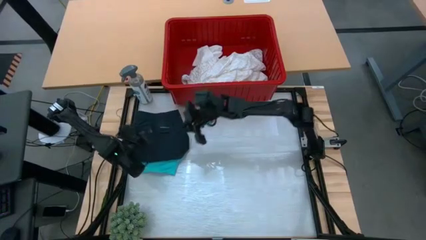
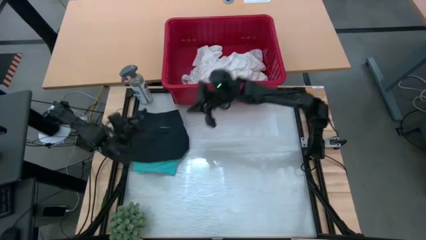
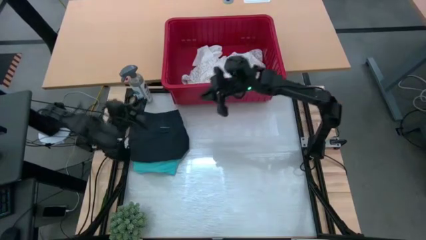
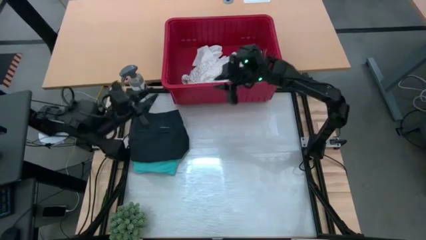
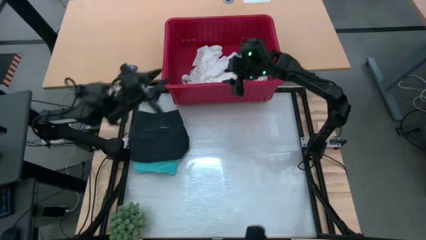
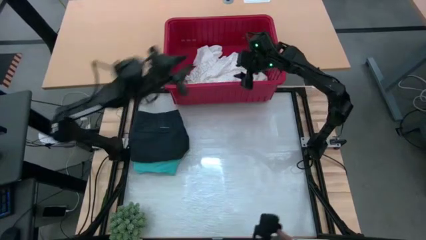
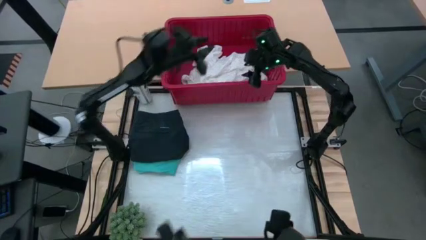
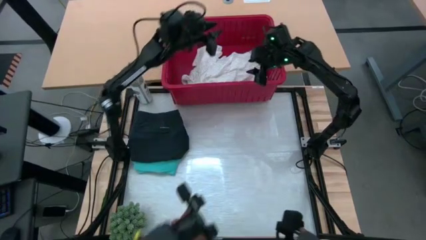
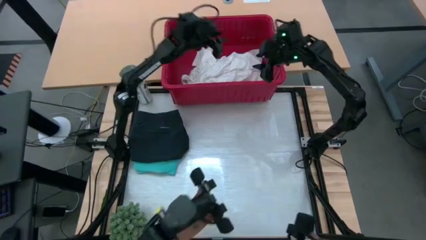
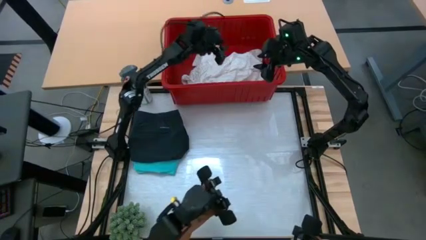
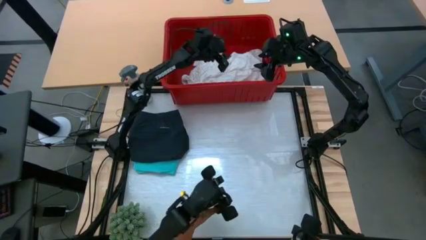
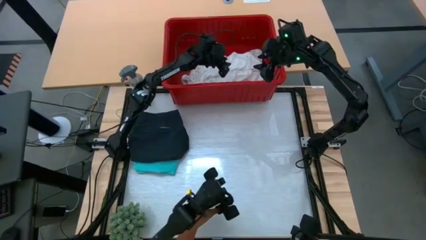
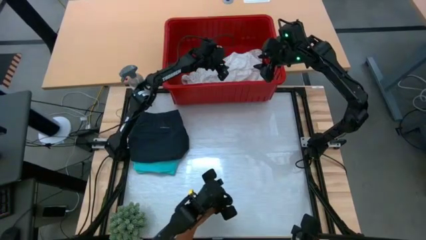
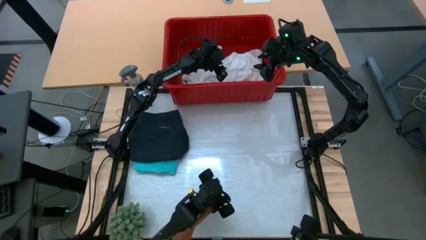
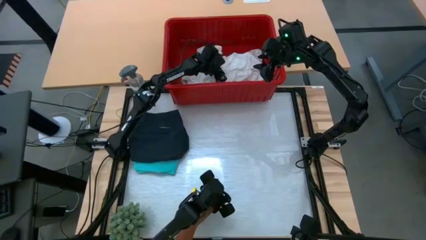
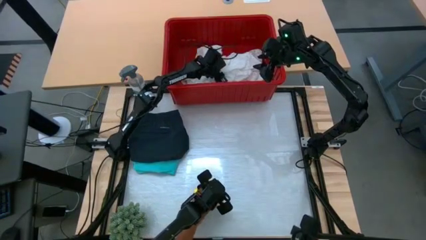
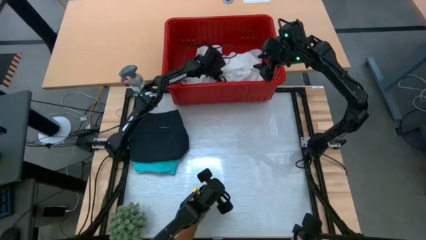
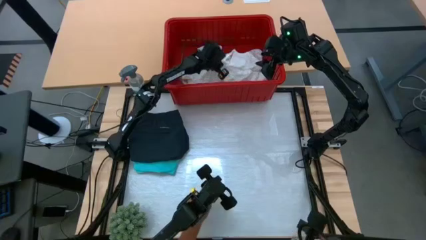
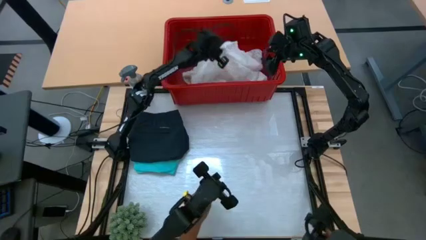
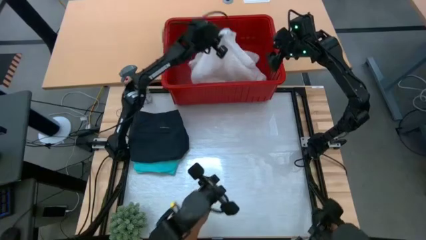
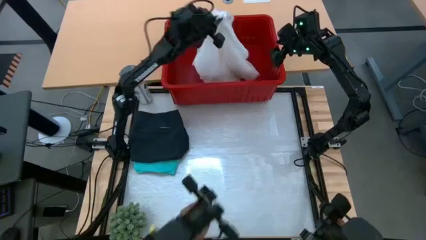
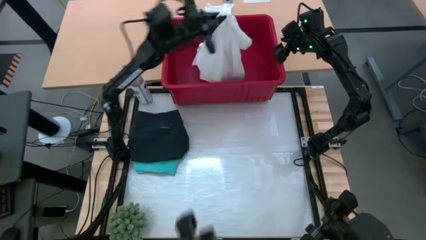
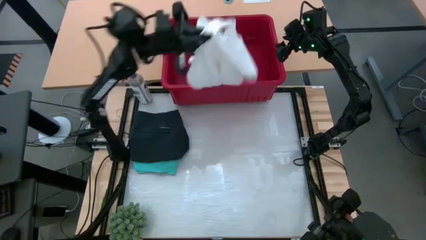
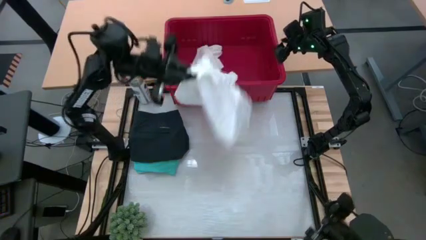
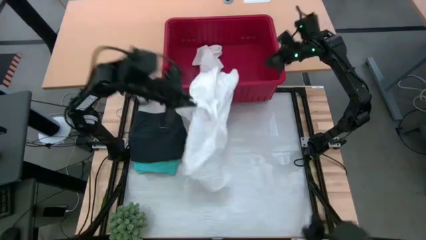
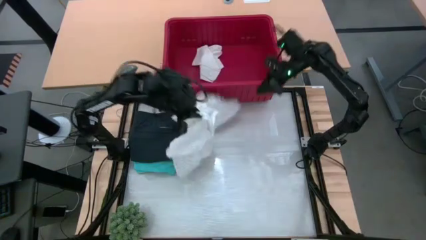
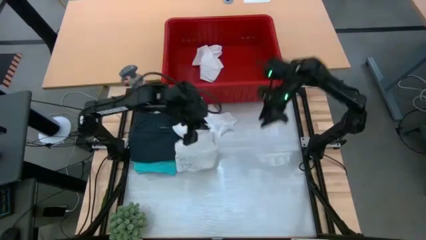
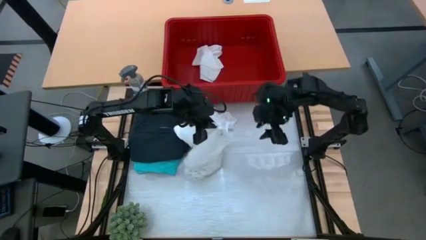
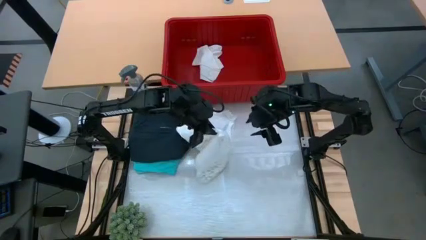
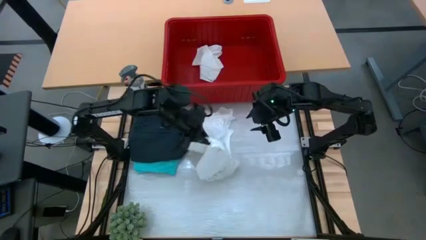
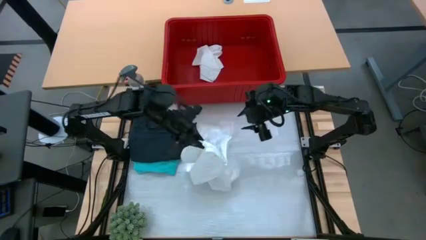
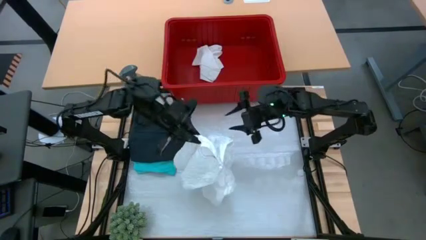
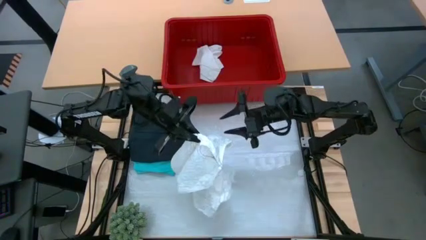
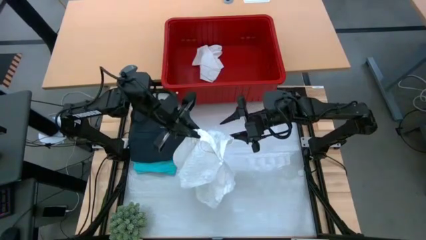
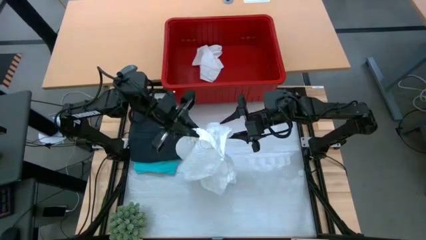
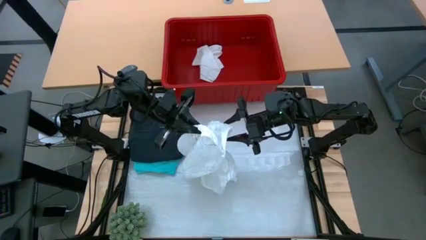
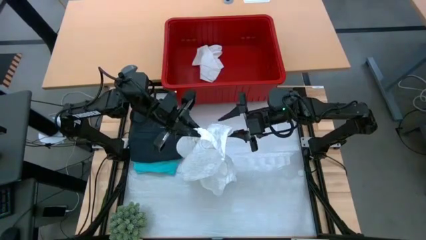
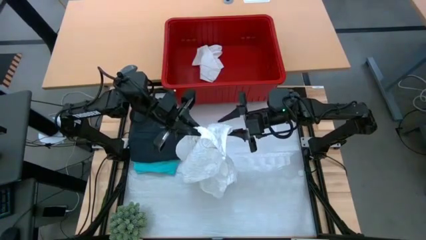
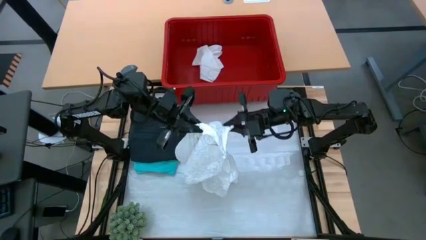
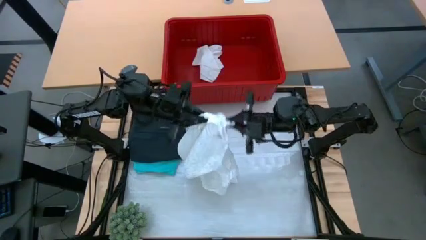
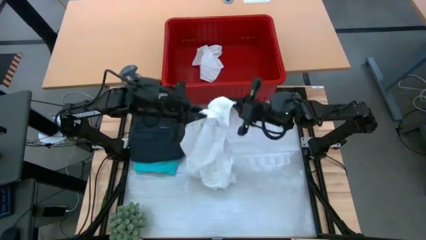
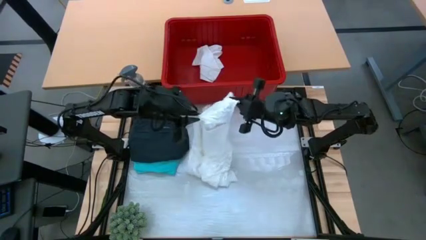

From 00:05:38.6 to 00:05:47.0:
Task: Fold laundry
Fold the white dress

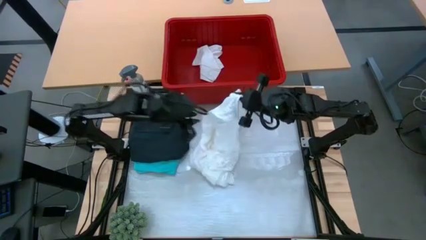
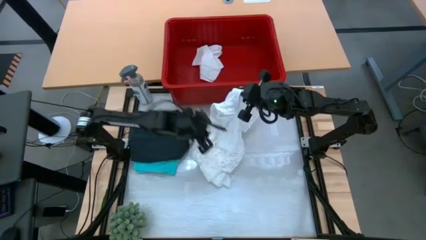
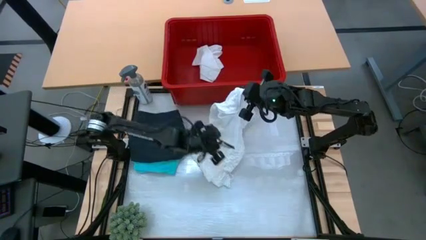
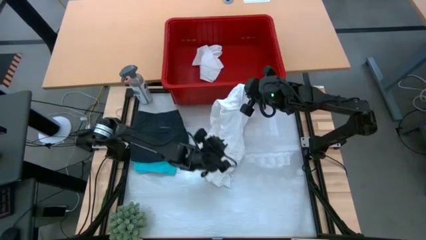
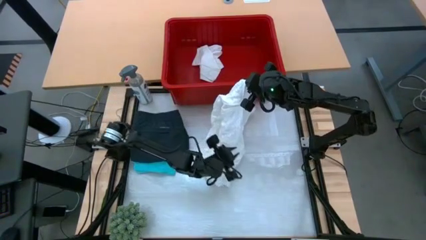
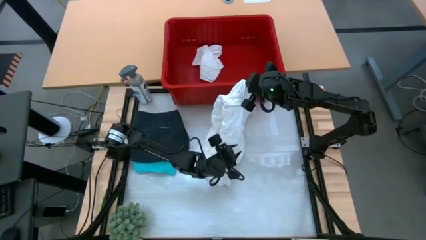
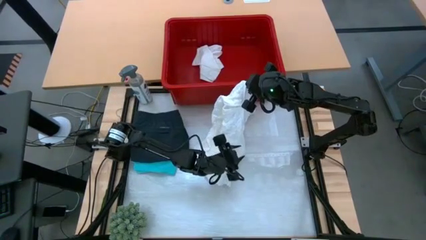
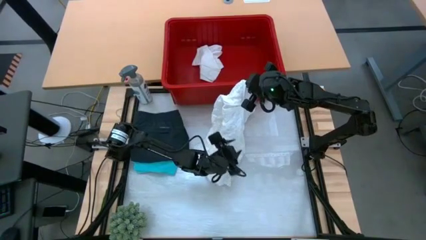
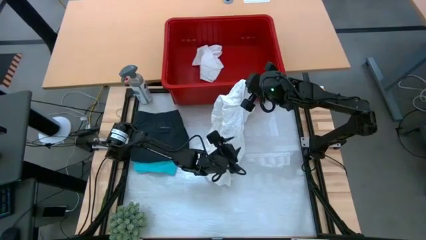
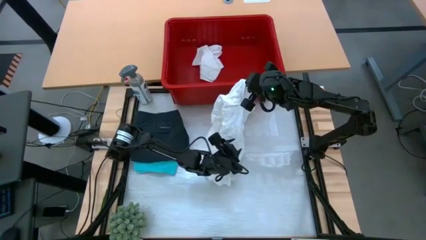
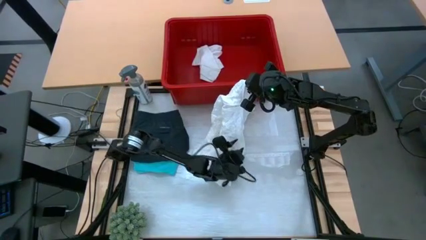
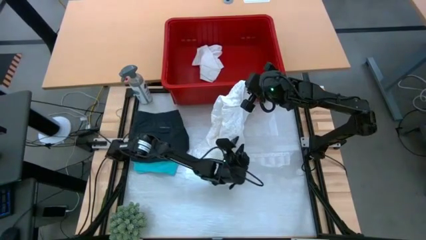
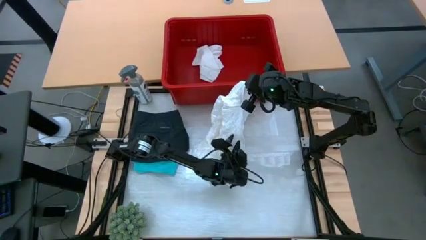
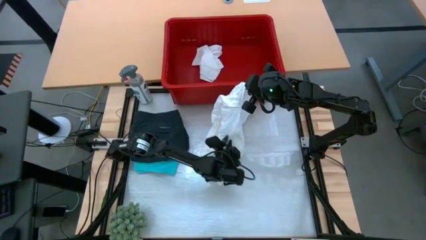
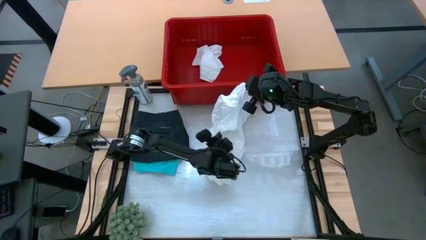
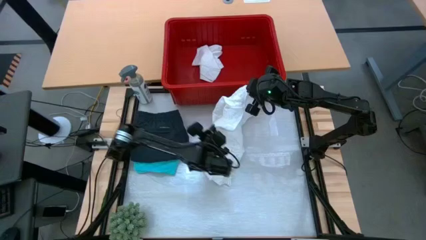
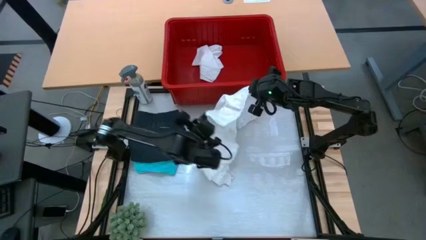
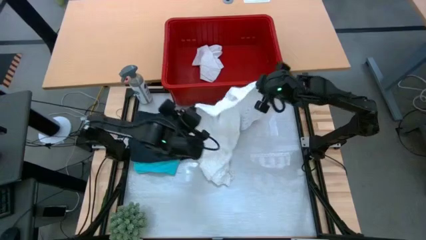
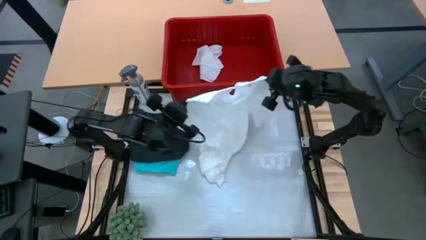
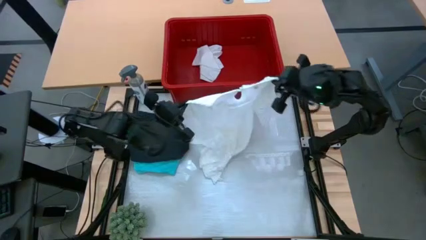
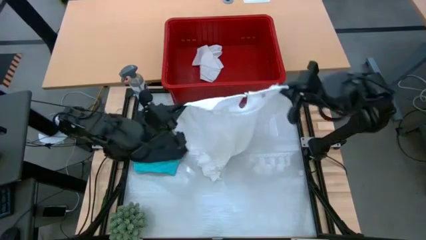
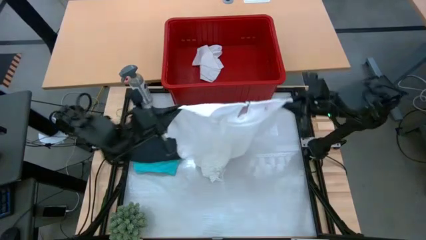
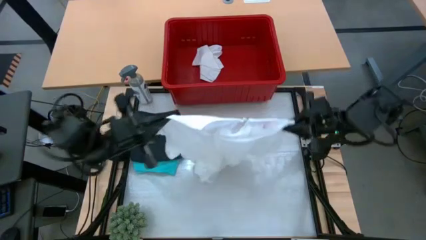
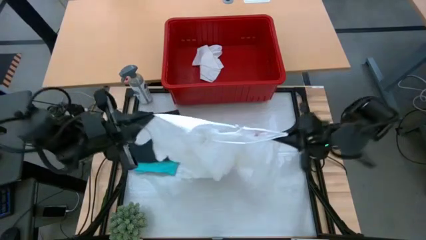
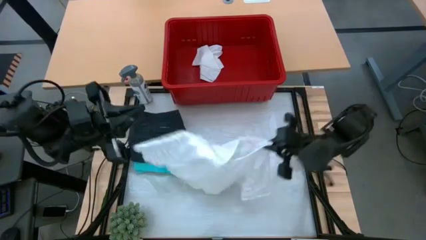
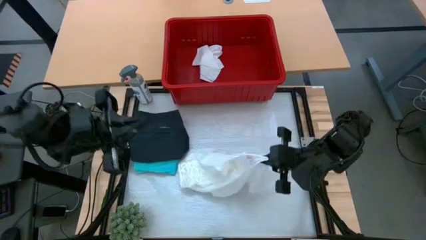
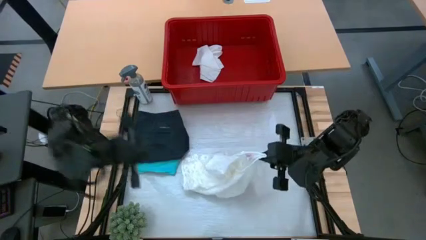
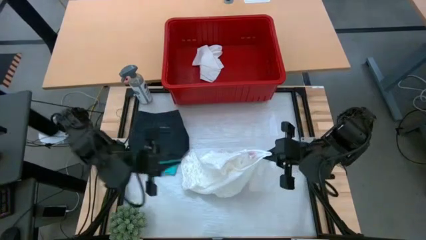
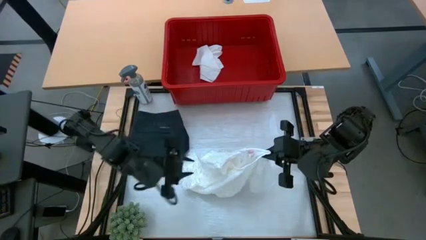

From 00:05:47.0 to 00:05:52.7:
Fold the white dress

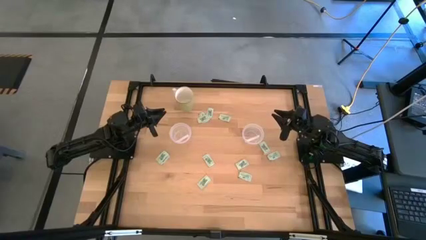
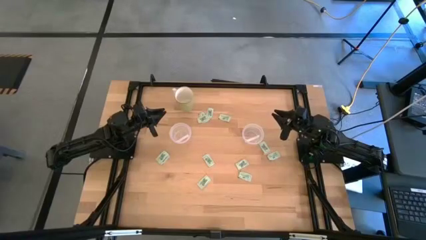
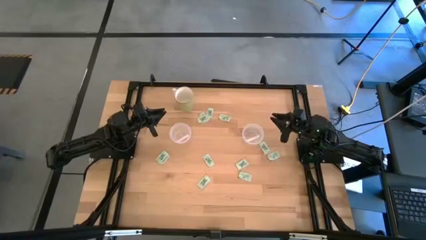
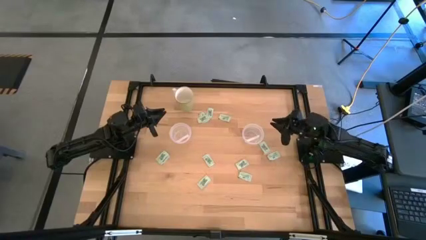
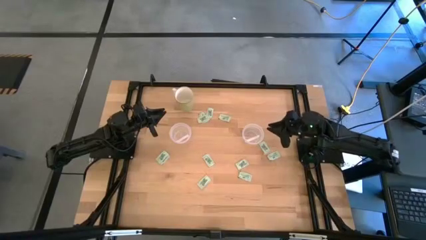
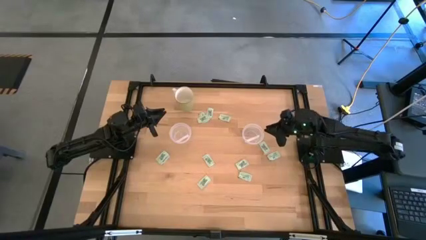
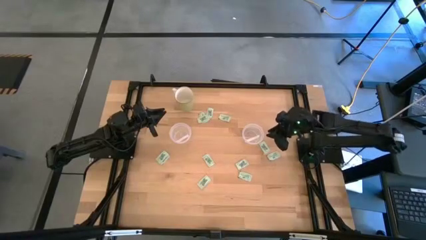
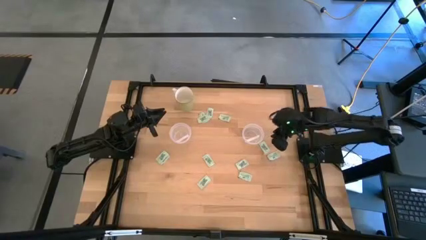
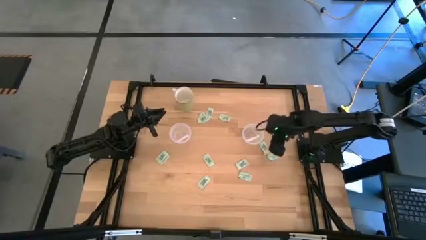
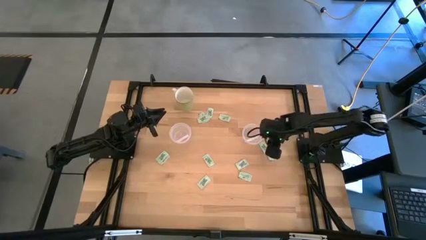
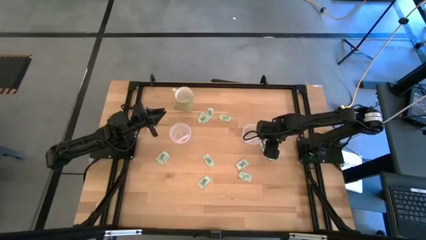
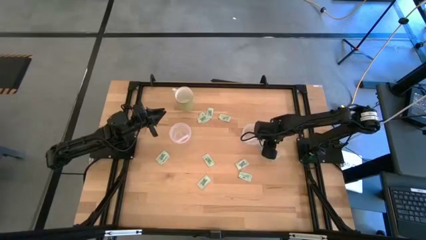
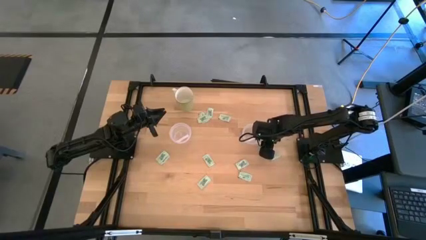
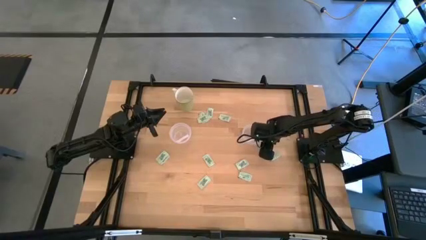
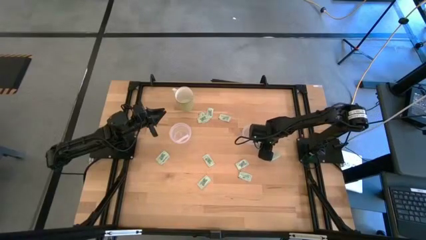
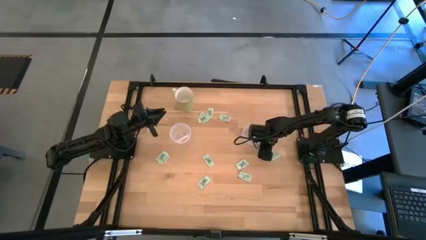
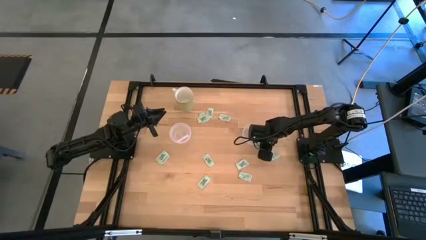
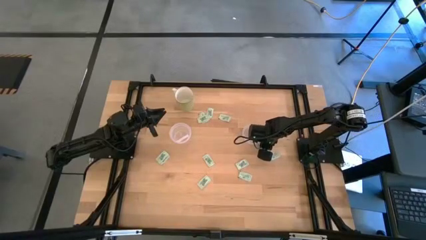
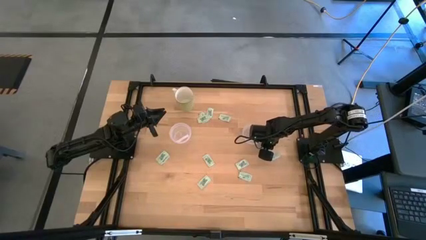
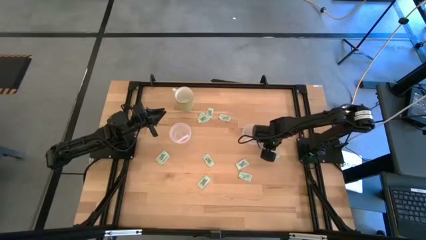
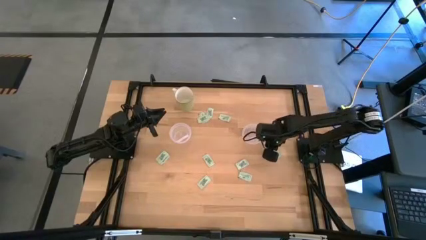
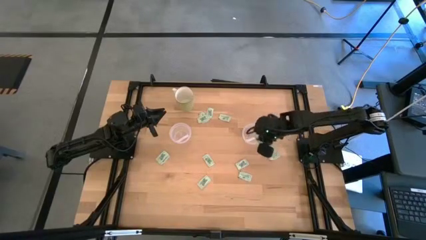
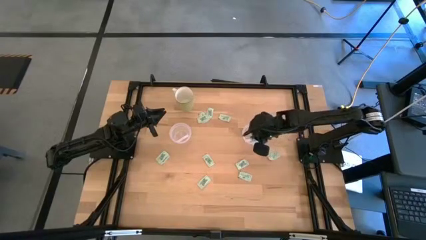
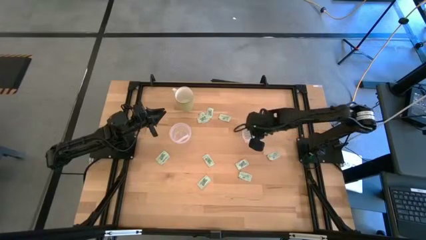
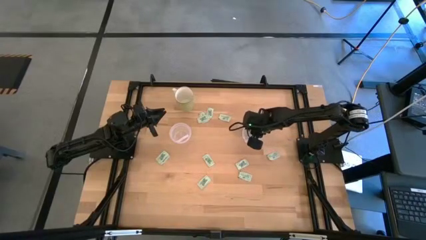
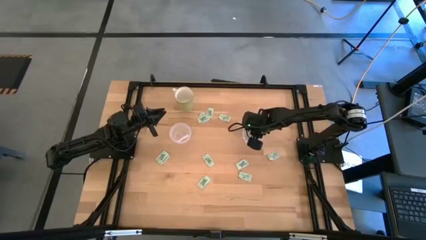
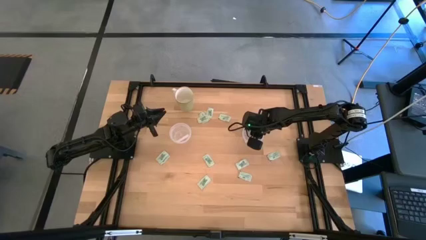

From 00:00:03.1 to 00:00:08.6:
Task: Pick and place Stevia / Truvia into bins
Put the stevia packet into the right transparent container
